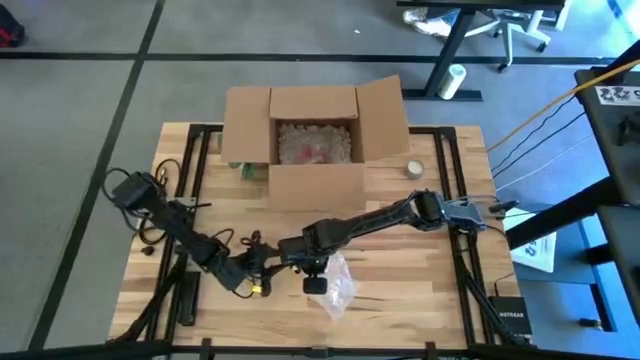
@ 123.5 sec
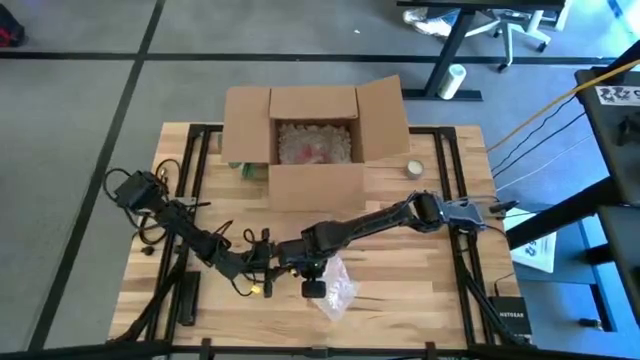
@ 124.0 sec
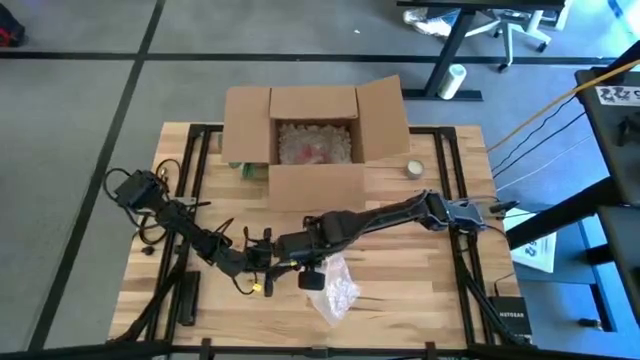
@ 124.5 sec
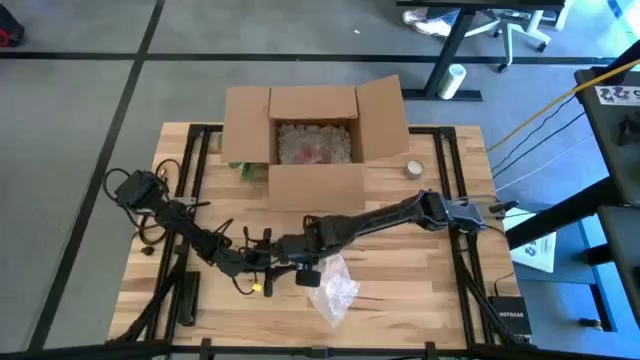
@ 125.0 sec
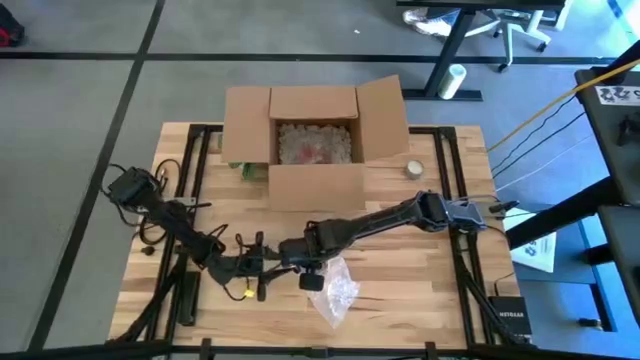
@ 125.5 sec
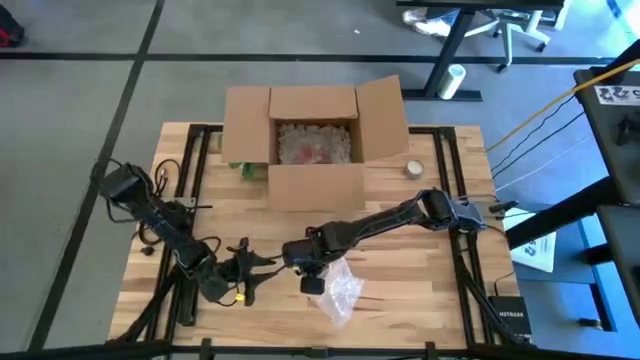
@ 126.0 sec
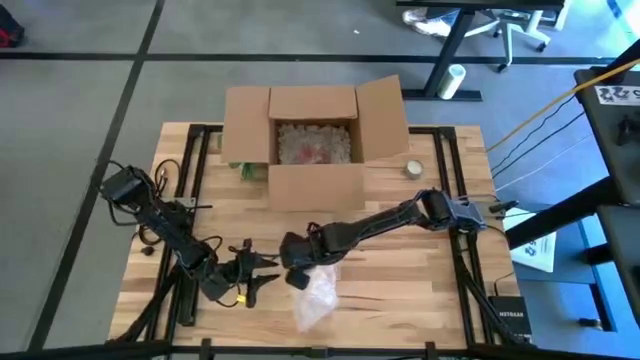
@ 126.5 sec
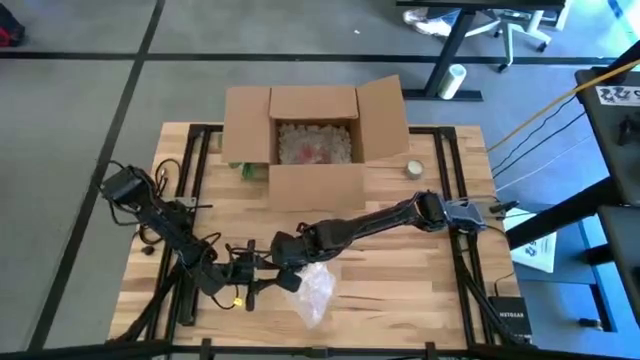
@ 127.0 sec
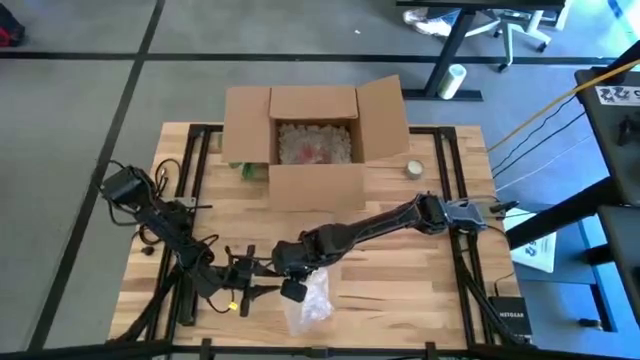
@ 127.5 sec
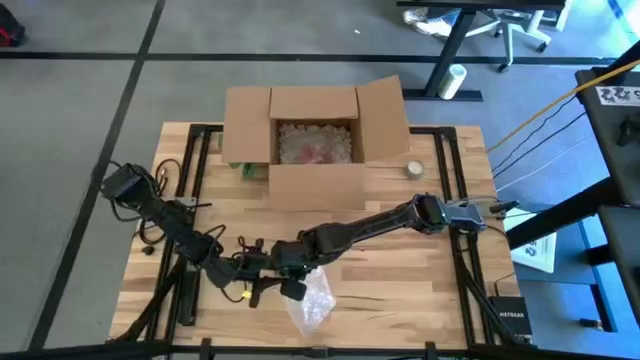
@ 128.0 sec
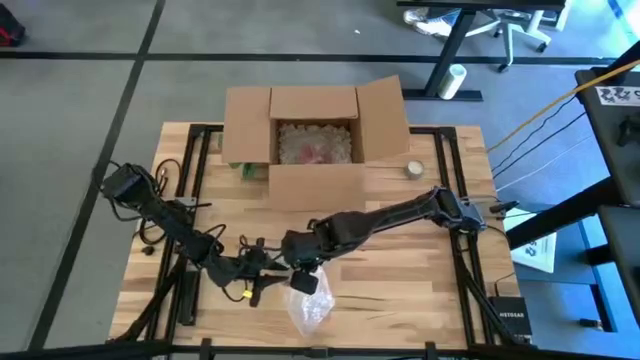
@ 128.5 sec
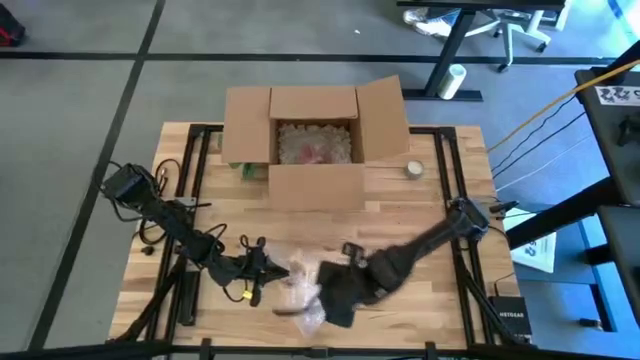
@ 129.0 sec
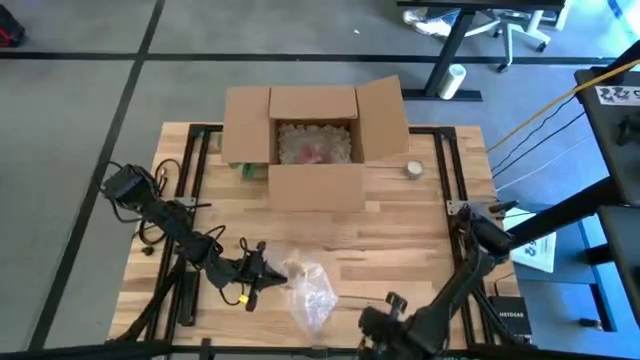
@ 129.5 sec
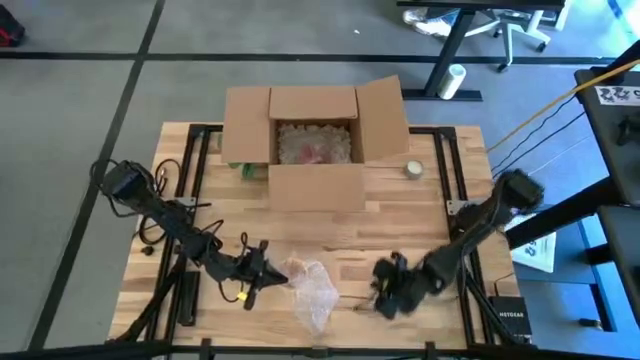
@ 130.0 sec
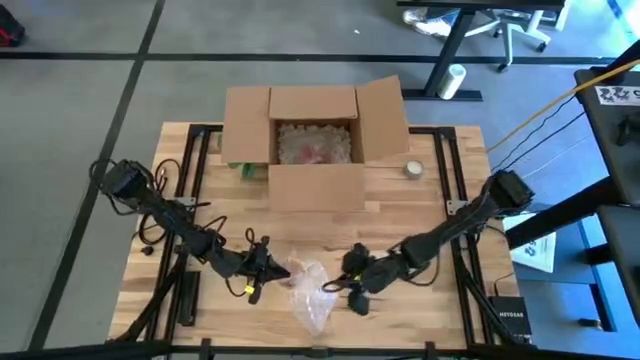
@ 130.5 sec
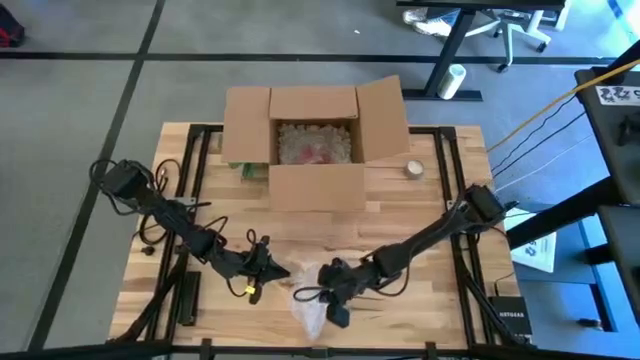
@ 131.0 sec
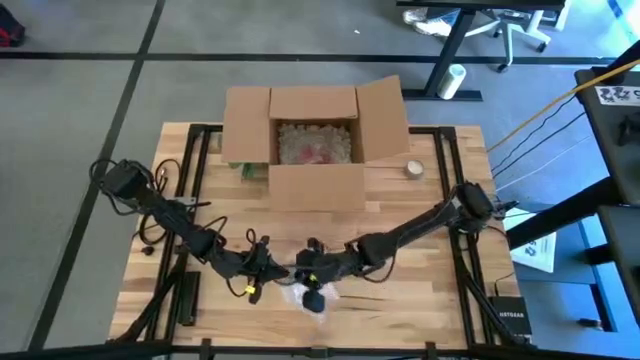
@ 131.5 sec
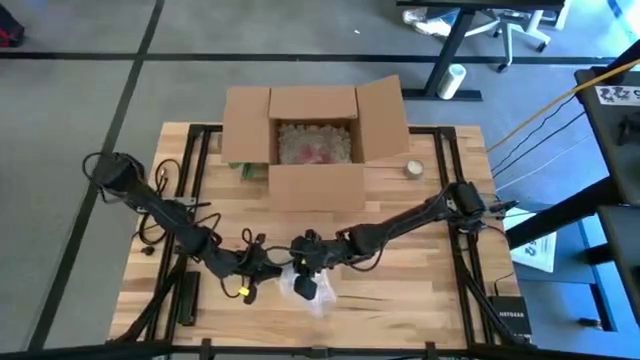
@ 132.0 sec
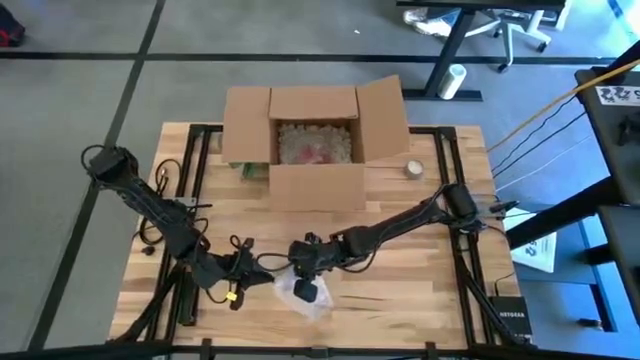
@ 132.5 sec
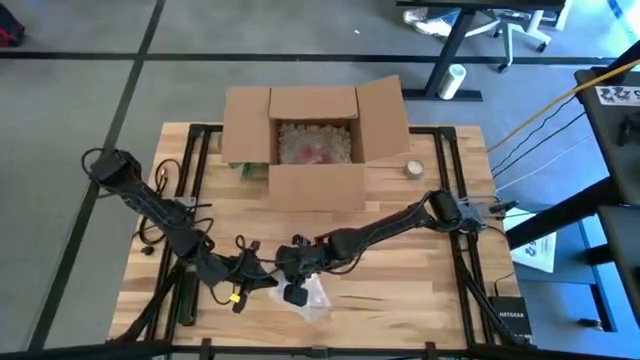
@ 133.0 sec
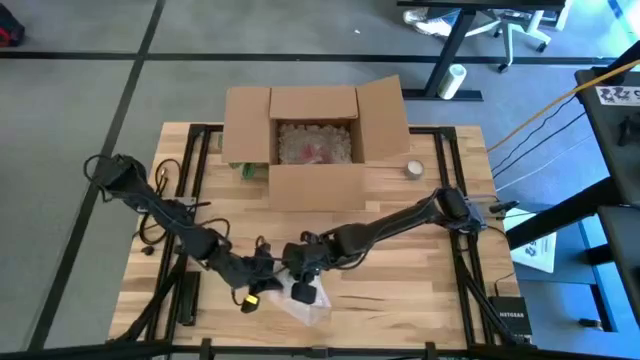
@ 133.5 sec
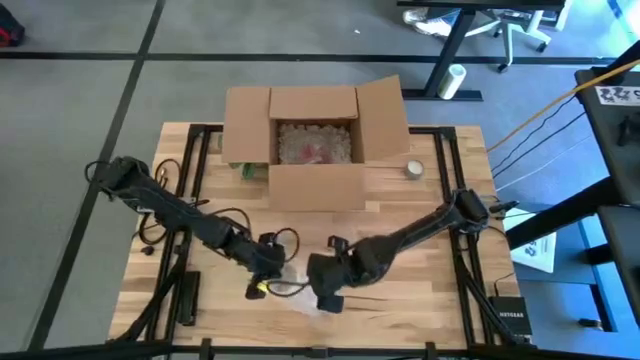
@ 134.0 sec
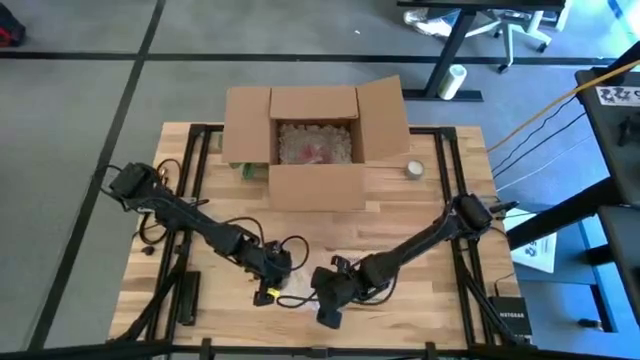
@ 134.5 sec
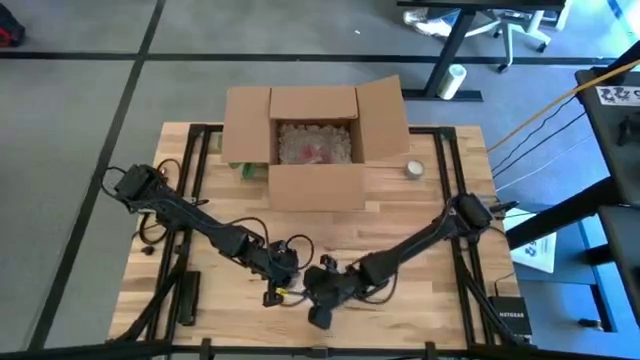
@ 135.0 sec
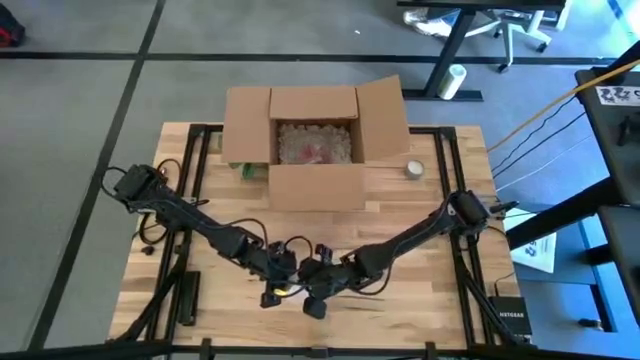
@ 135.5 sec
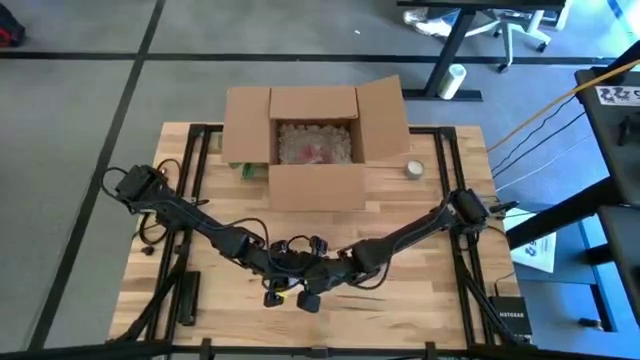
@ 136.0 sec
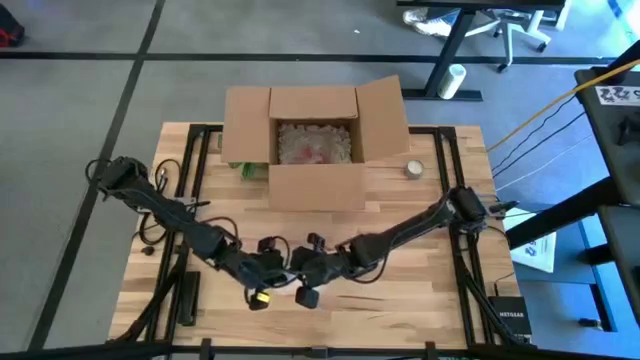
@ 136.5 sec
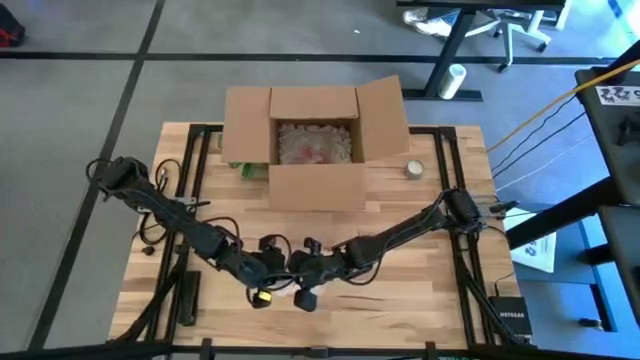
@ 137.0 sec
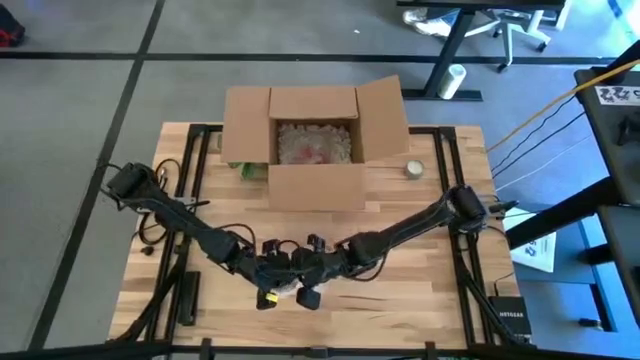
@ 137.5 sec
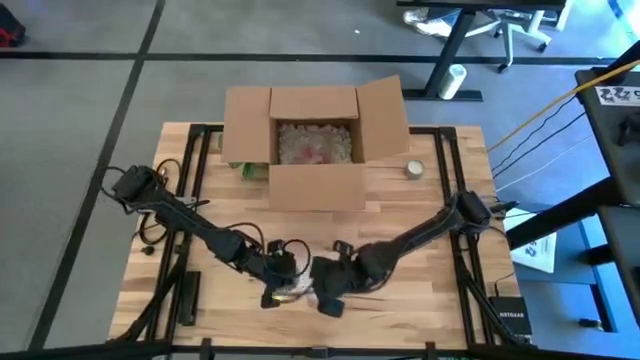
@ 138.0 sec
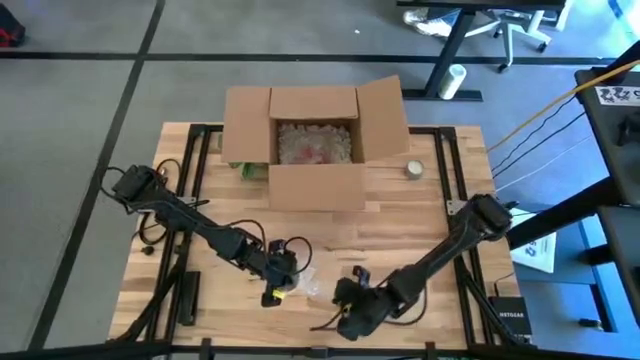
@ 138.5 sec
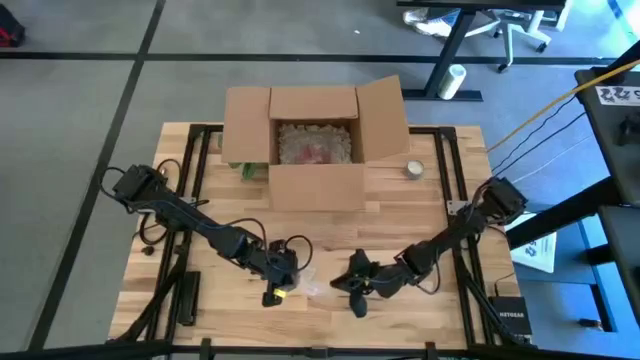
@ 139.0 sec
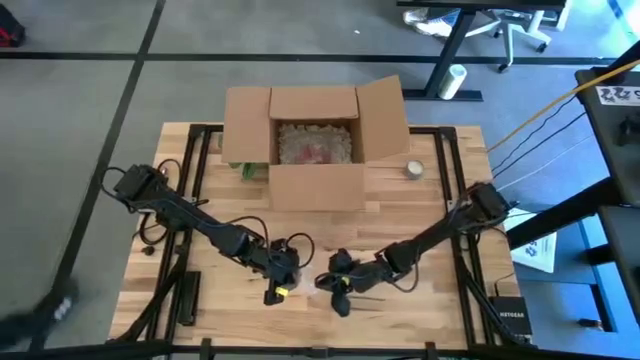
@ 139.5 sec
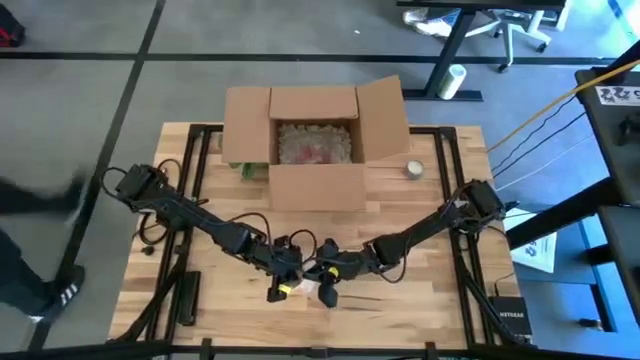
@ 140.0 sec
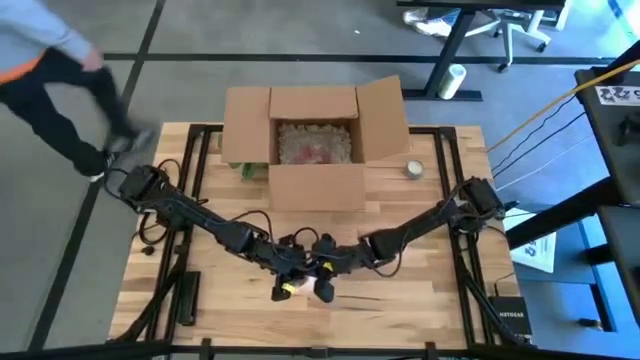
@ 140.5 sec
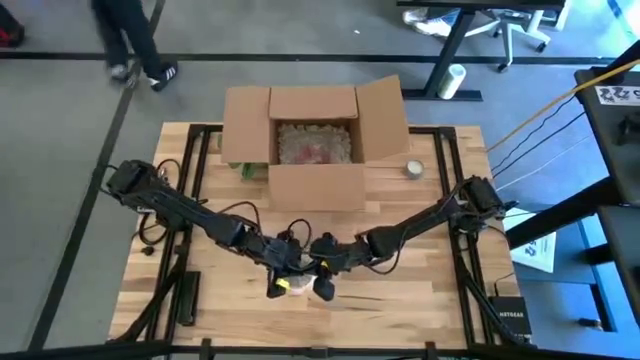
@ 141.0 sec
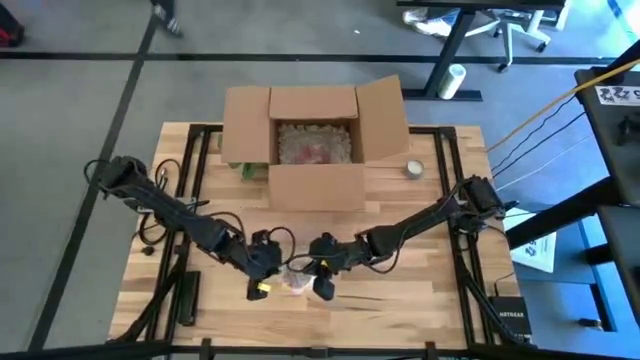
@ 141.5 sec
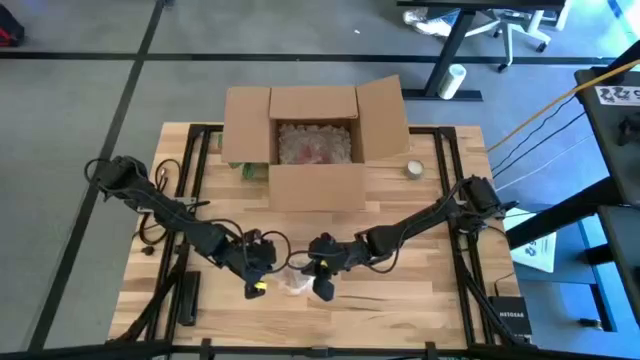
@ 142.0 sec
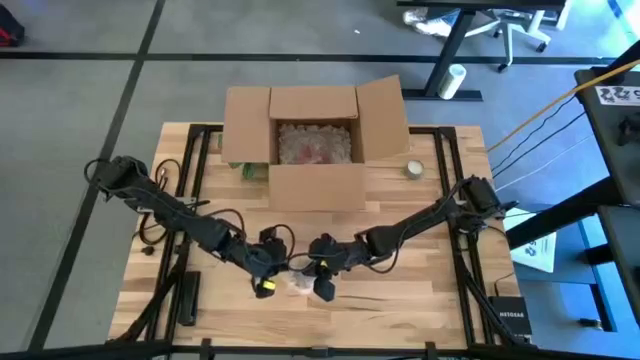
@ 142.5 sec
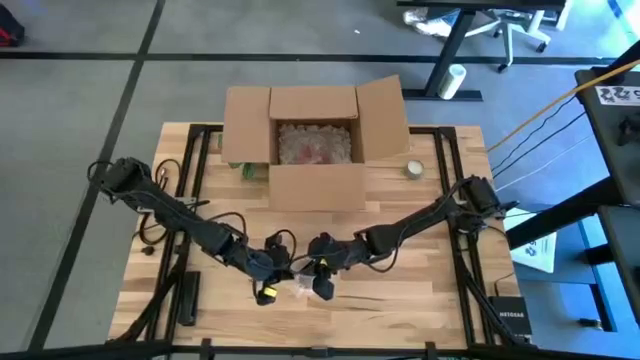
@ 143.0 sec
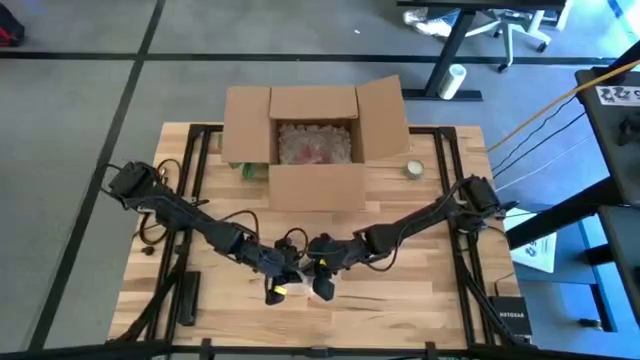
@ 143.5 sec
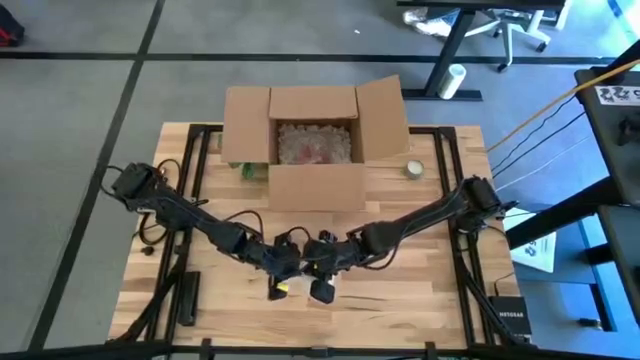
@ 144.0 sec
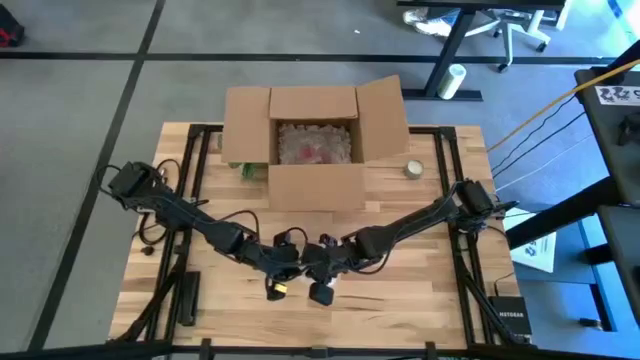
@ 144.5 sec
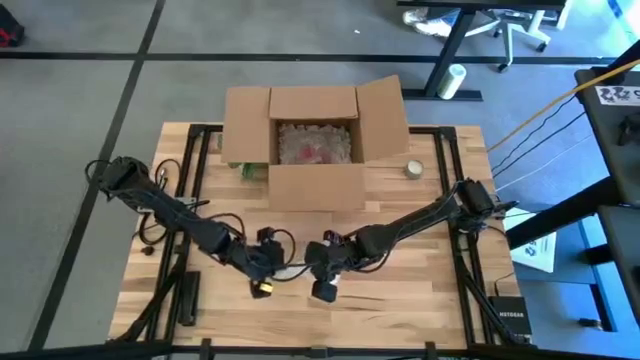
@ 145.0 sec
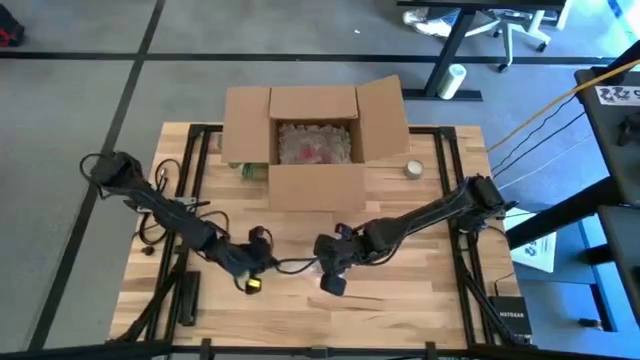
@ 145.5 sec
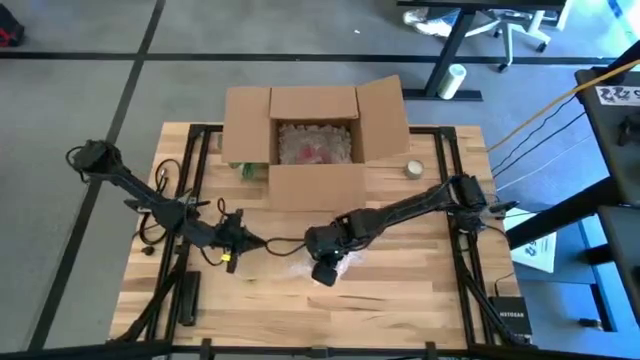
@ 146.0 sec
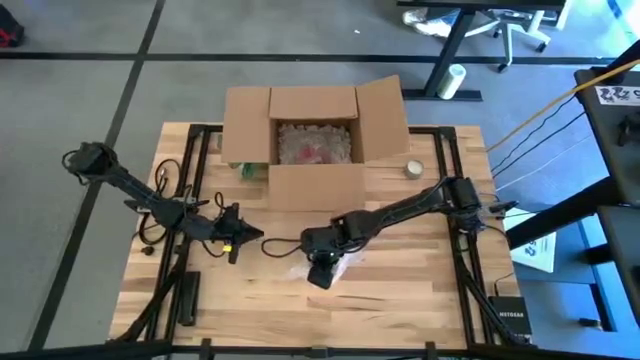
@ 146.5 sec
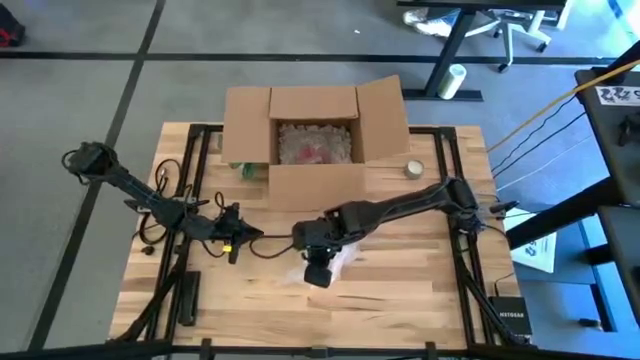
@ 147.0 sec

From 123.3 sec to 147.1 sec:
Task: wrap mug
Wrap the yellow cup with bubble wrap
